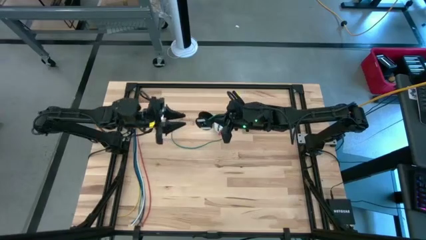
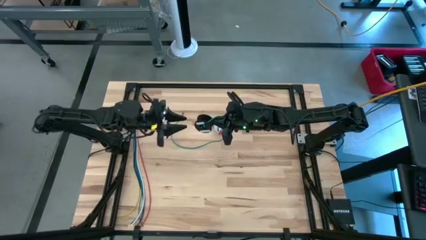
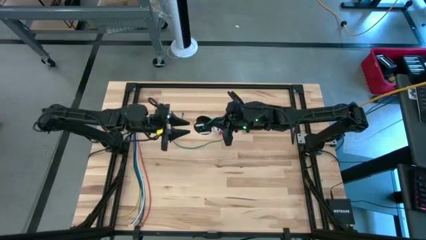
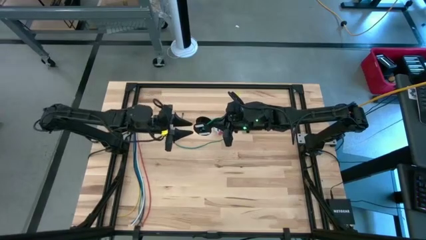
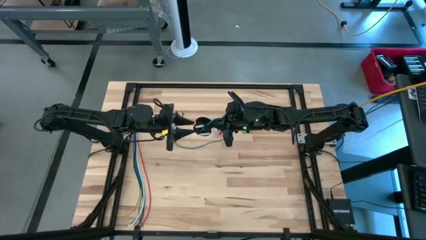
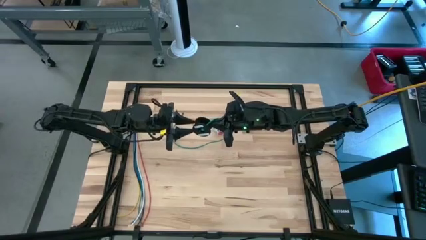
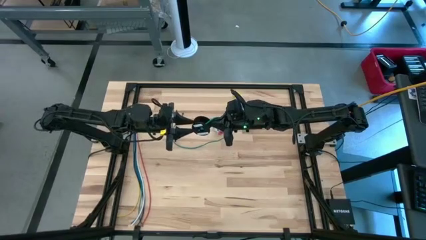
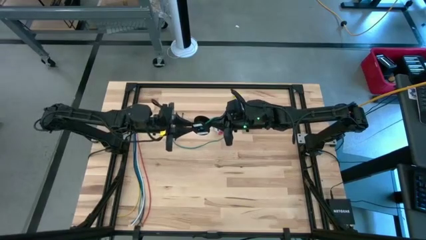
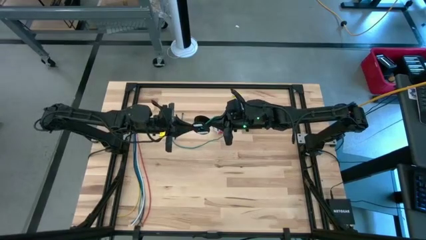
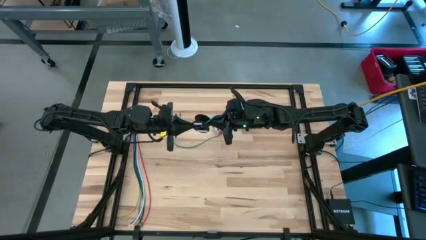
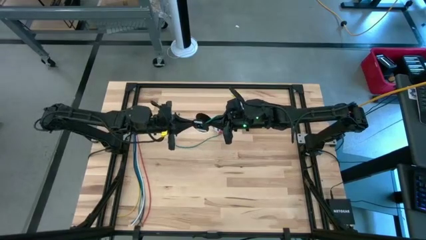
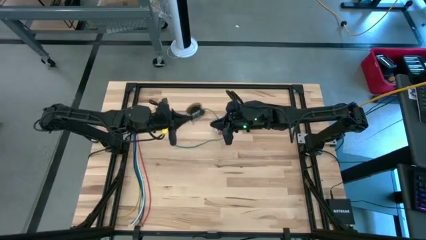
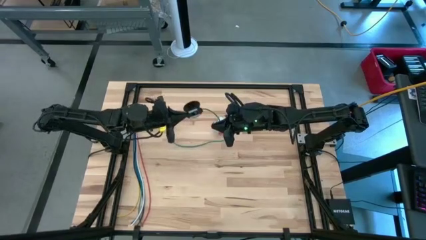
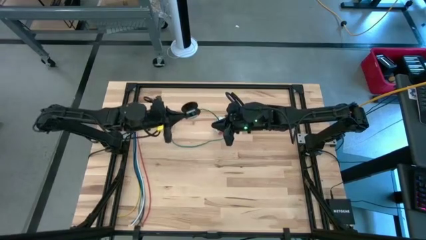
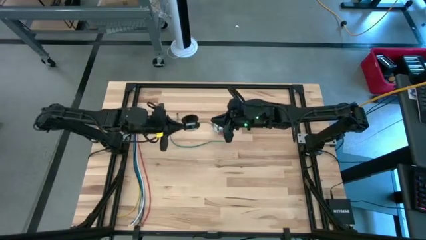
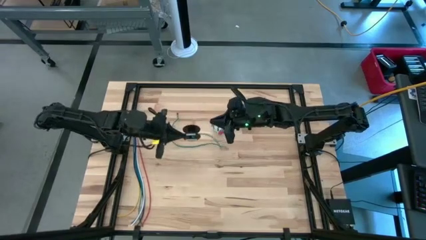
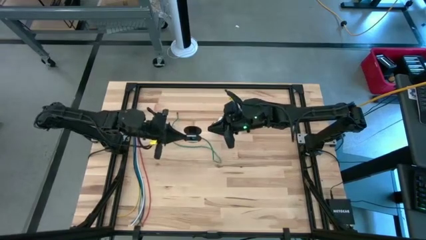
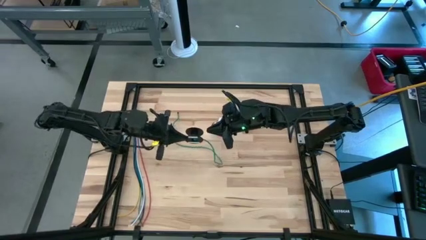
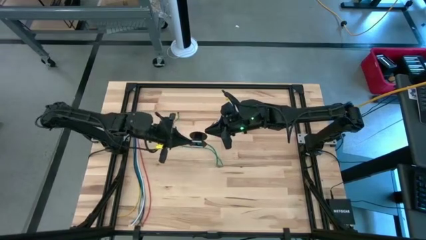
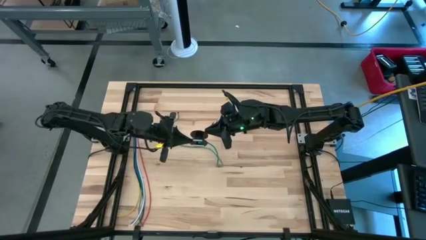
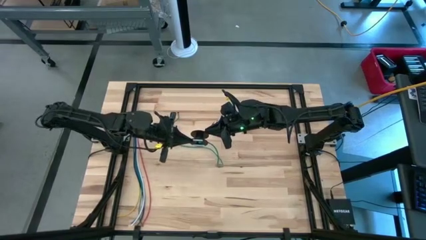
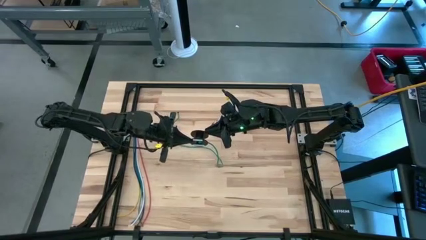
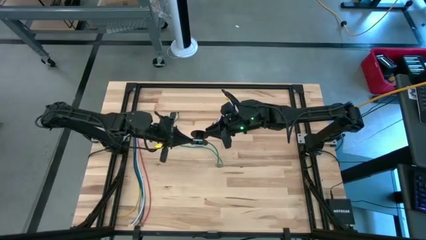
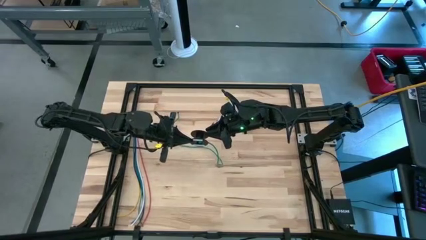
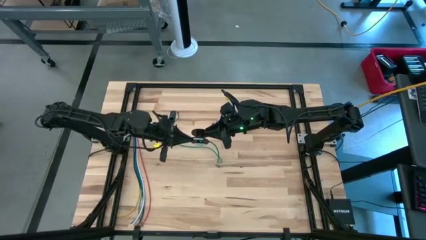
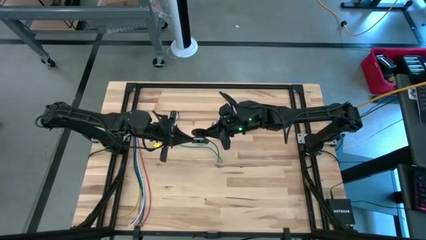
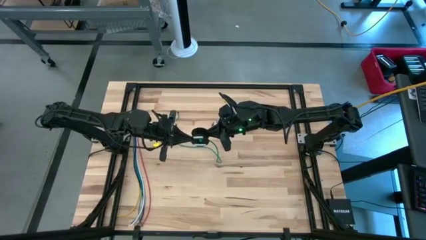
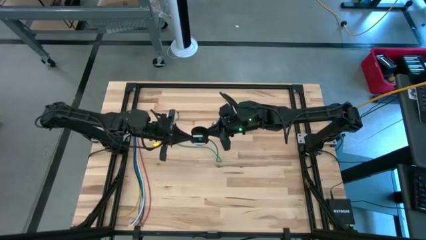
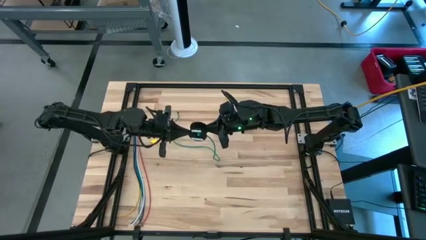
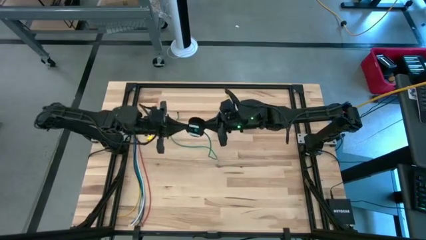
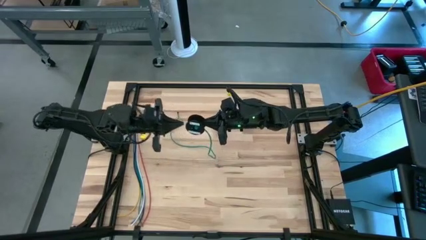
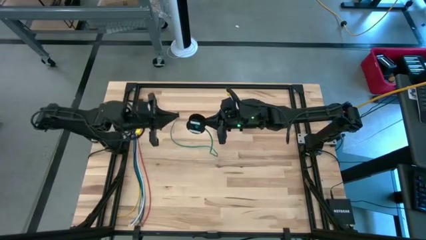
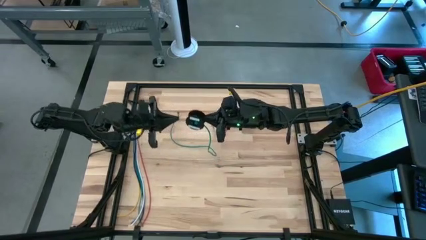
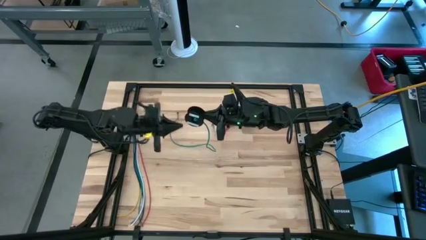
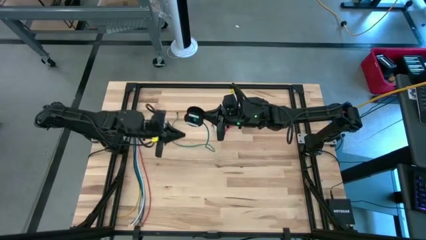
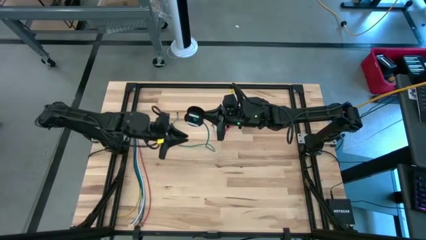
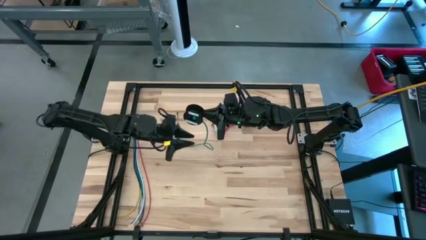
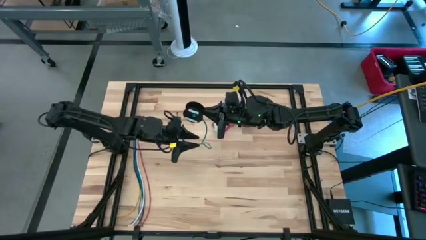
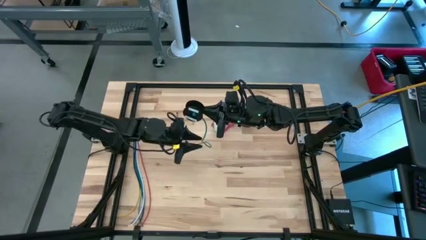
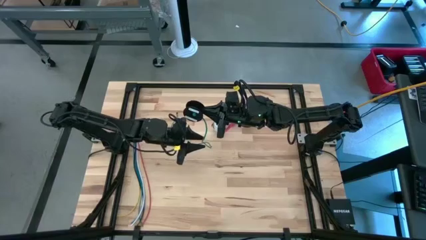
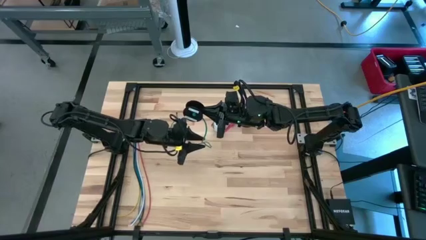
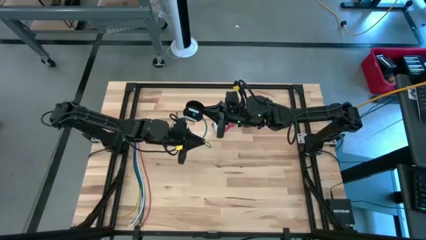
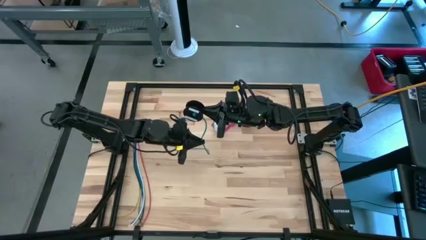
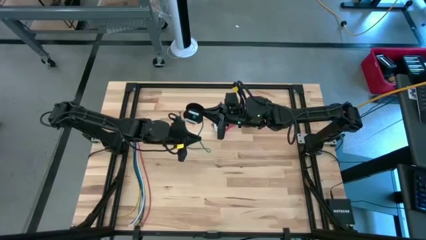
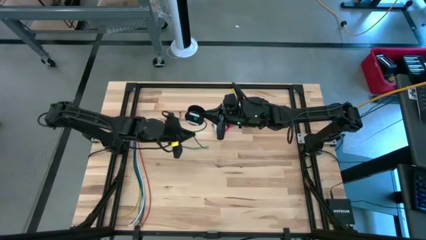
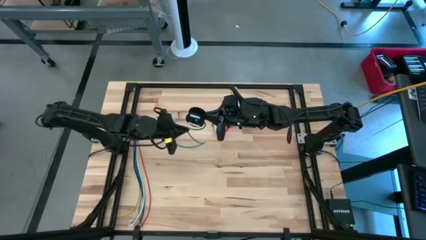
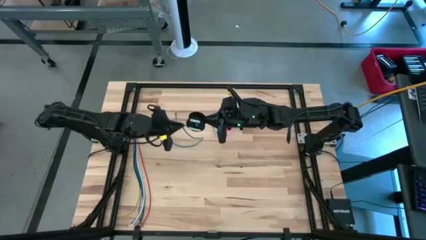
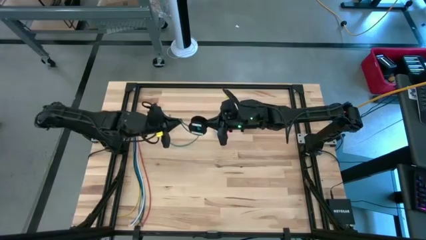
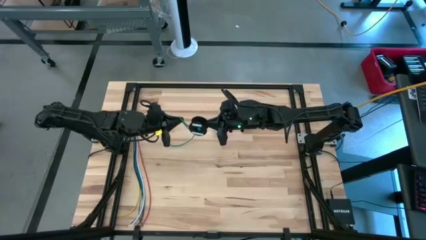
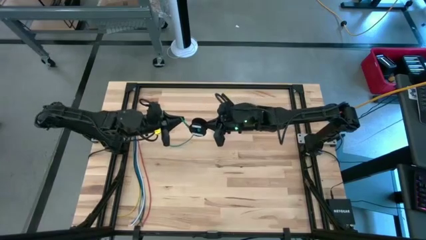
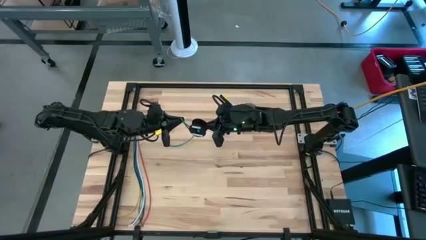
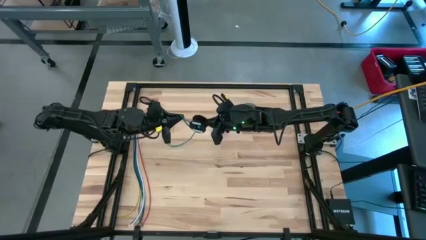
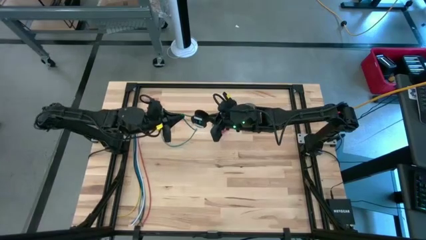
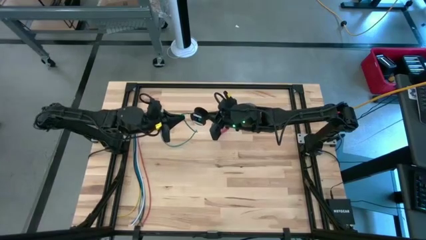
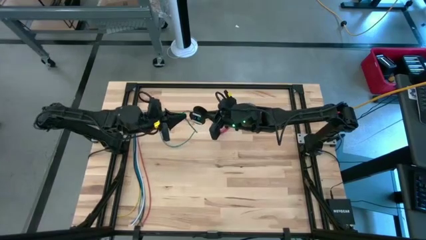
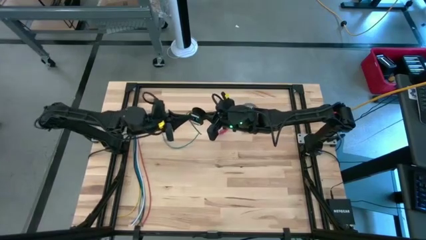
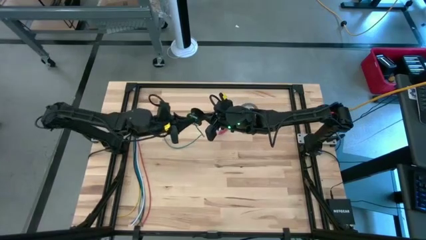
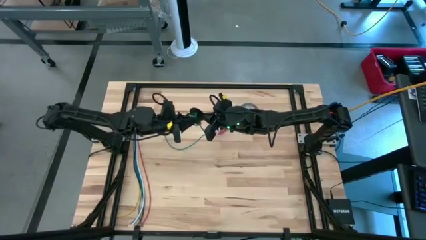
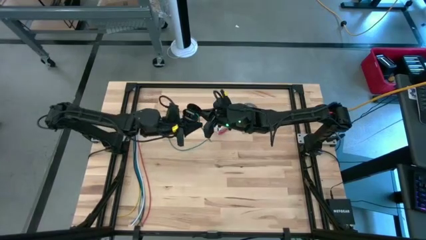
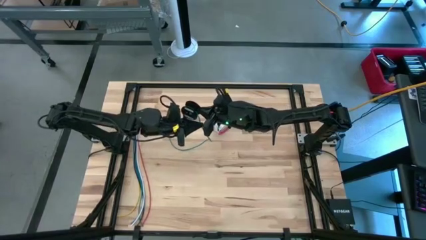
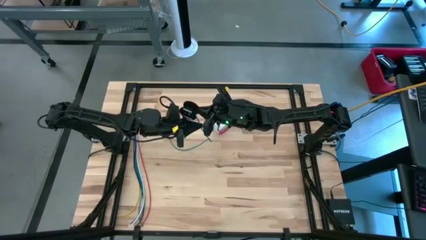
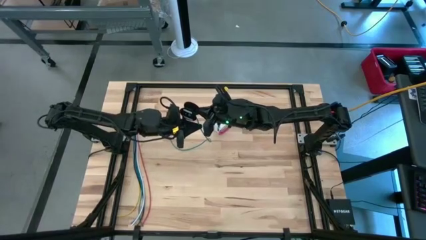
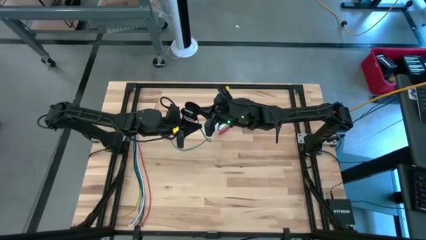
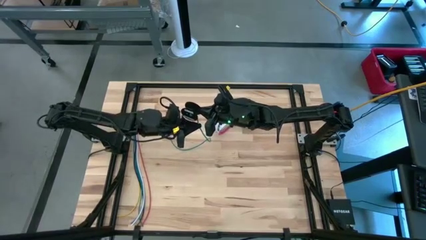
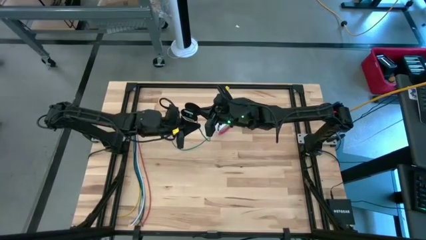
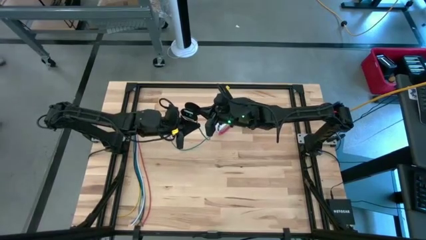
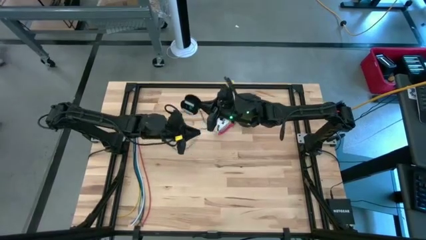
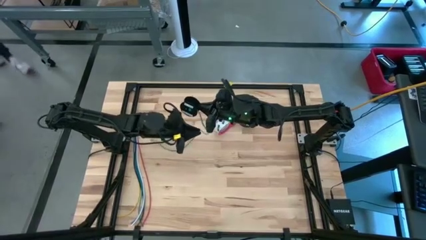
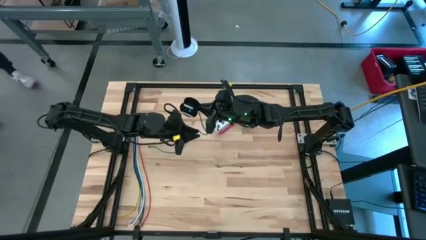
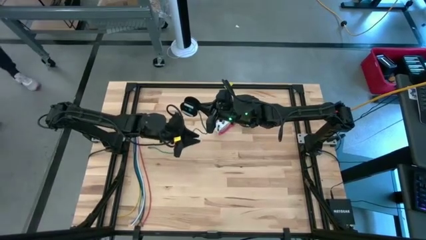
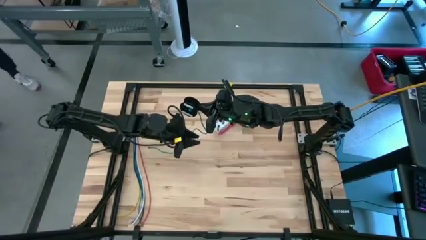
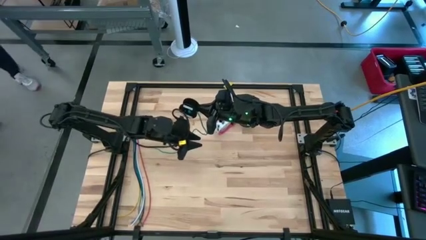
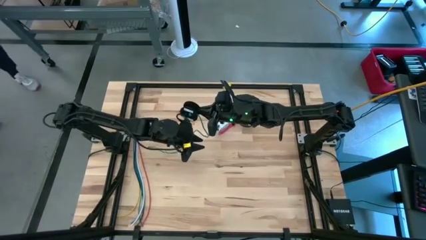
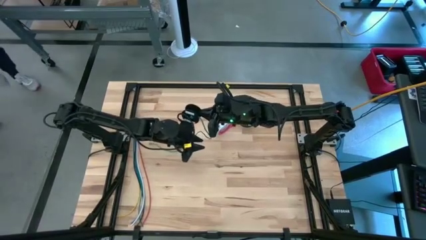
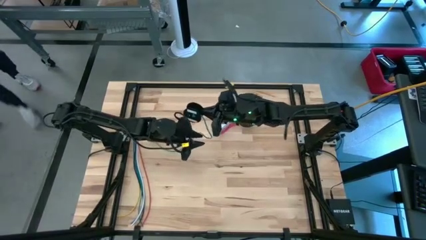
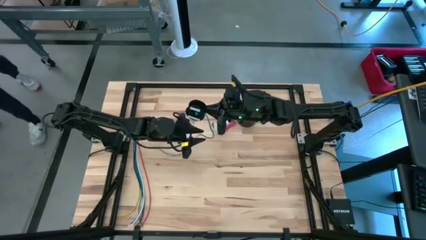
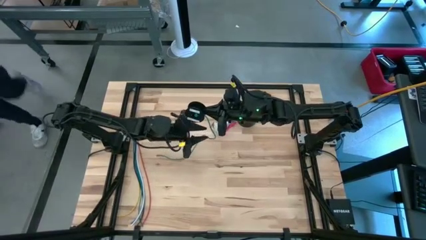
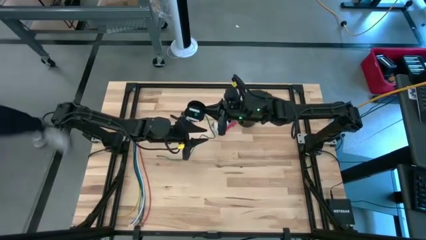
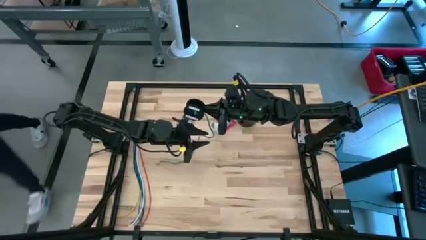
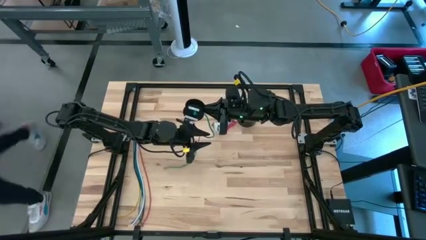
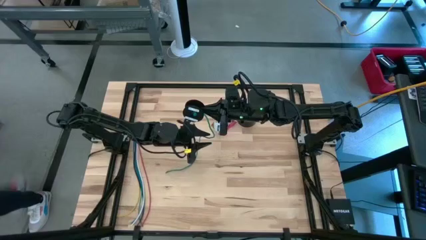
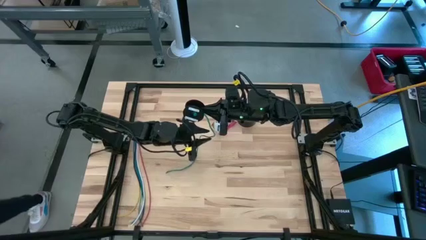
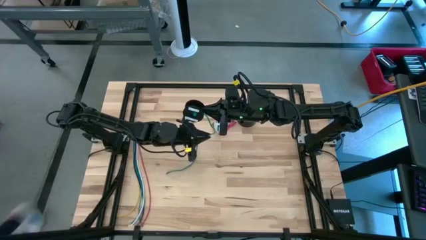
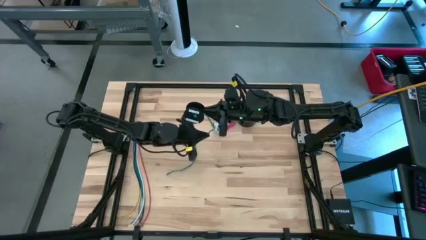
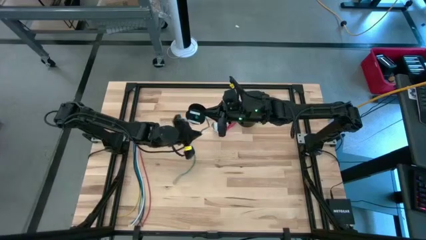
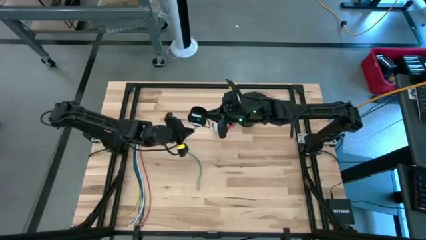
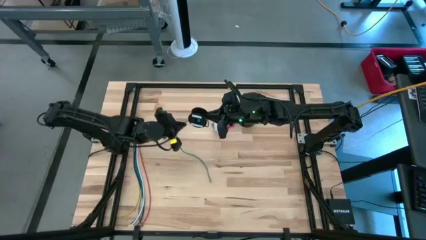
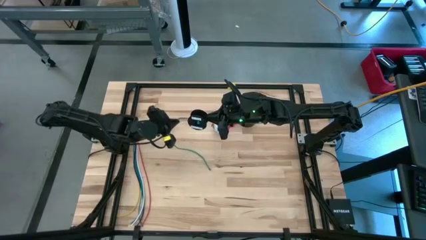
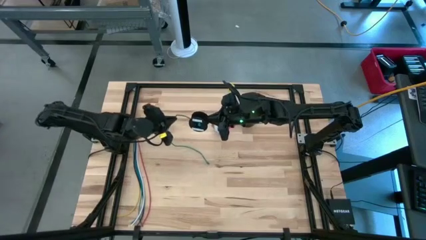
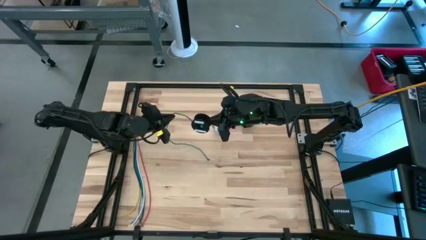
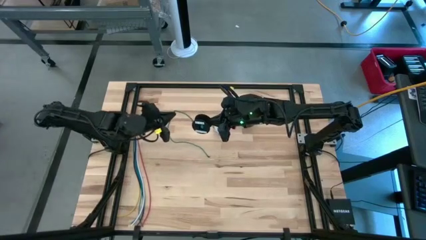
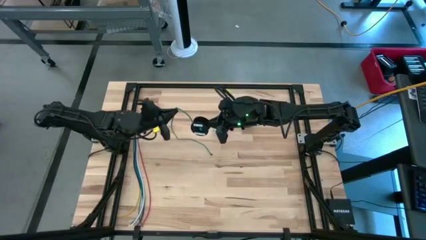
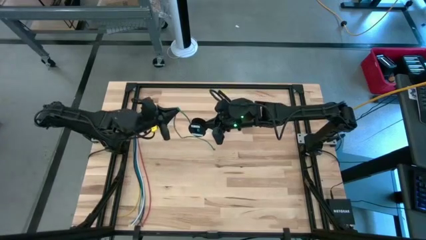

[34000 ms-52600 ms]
Task: Coil cords
Coil the green wire on the spool
